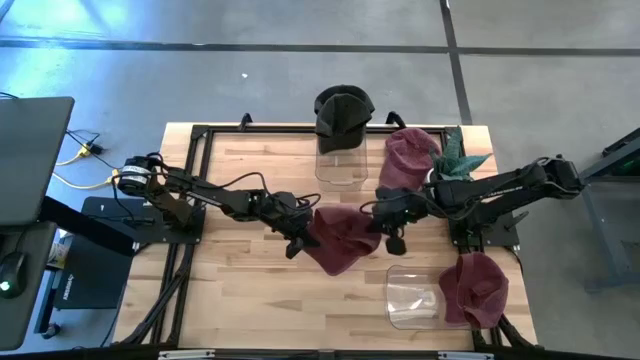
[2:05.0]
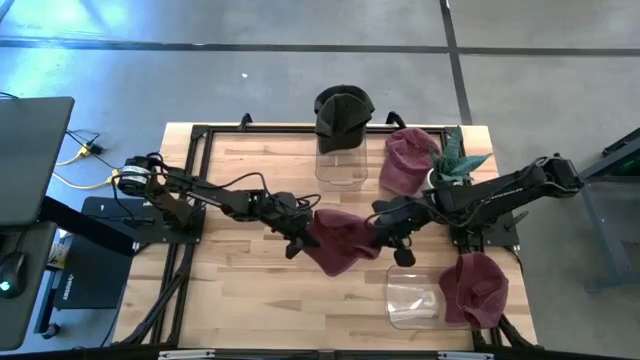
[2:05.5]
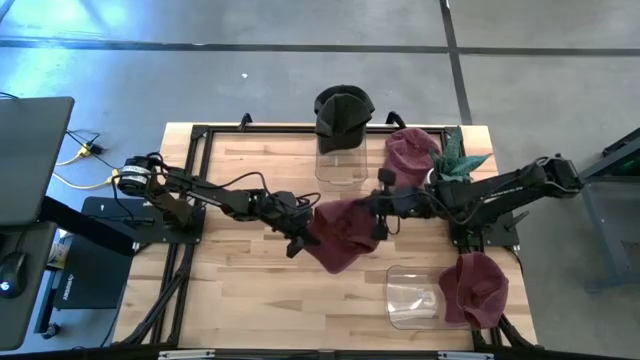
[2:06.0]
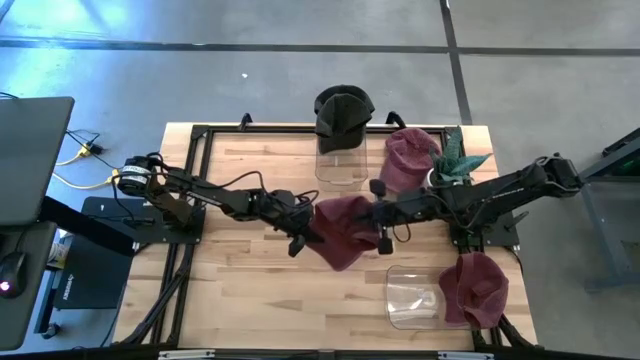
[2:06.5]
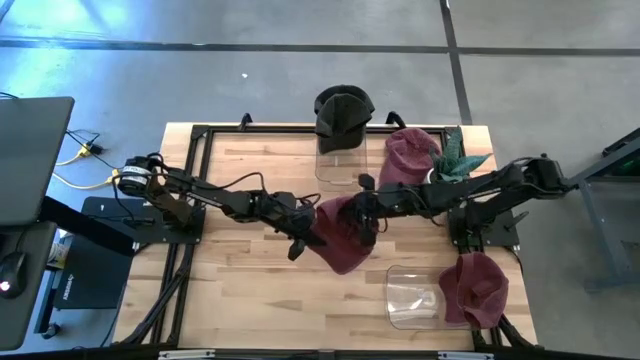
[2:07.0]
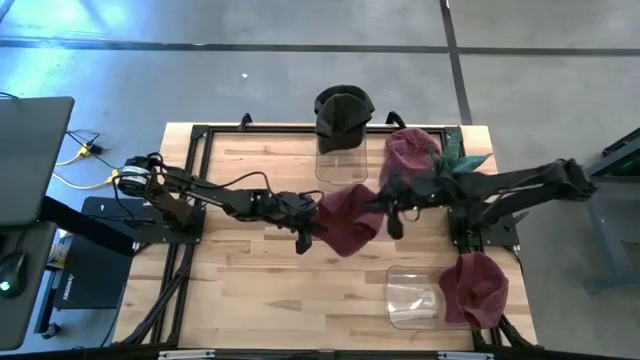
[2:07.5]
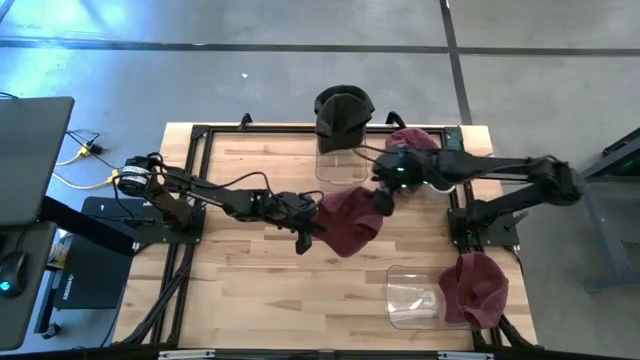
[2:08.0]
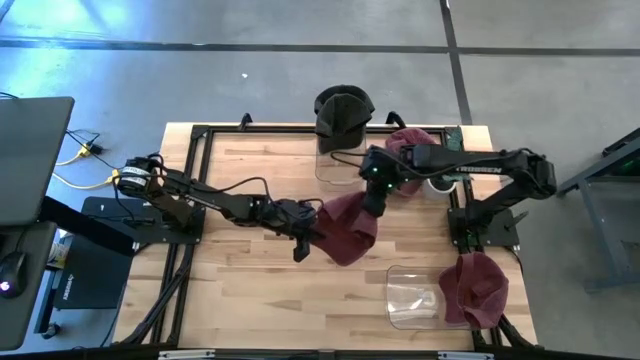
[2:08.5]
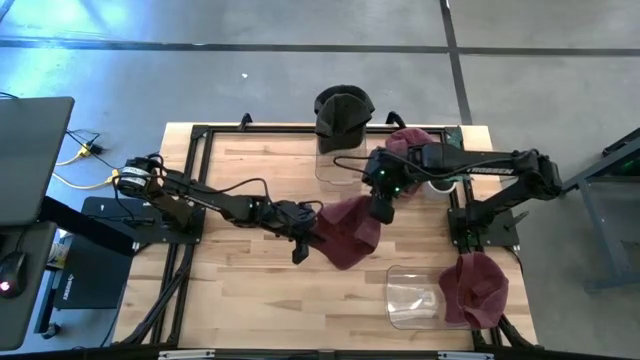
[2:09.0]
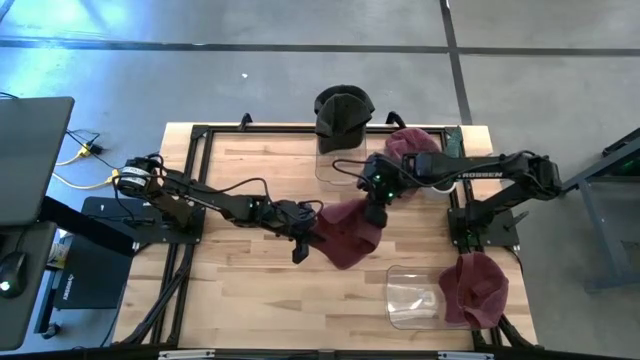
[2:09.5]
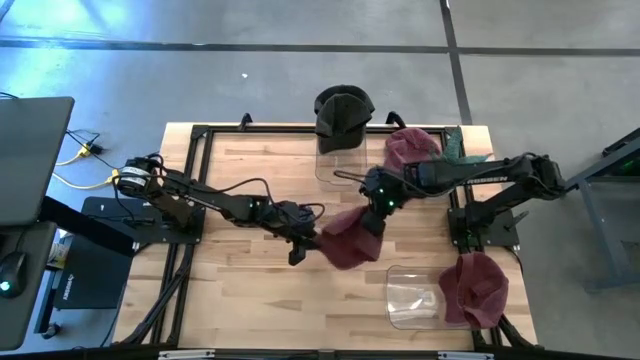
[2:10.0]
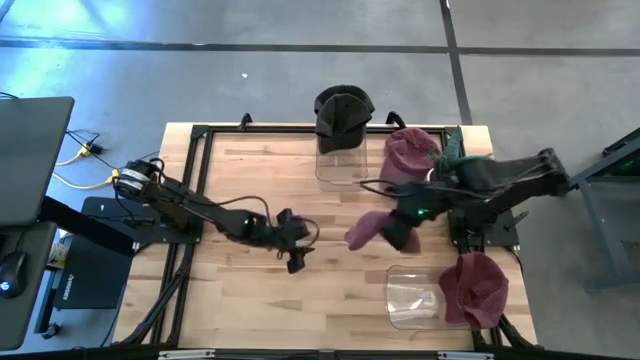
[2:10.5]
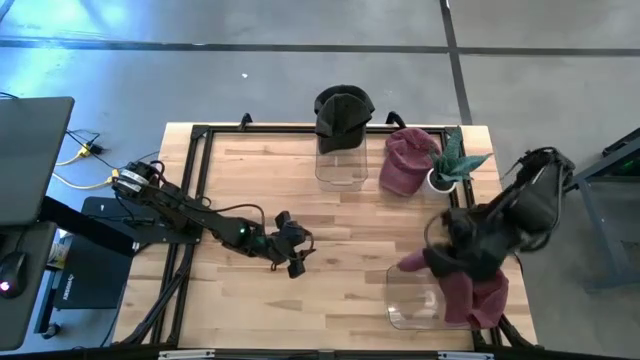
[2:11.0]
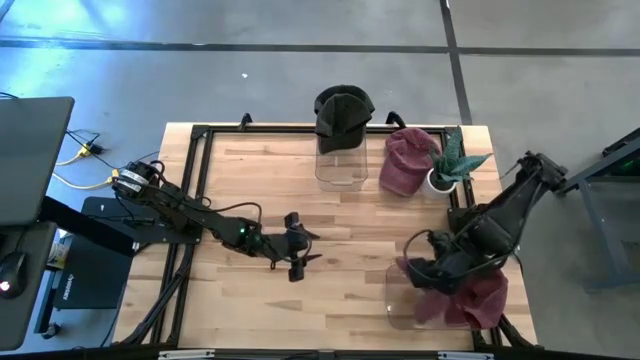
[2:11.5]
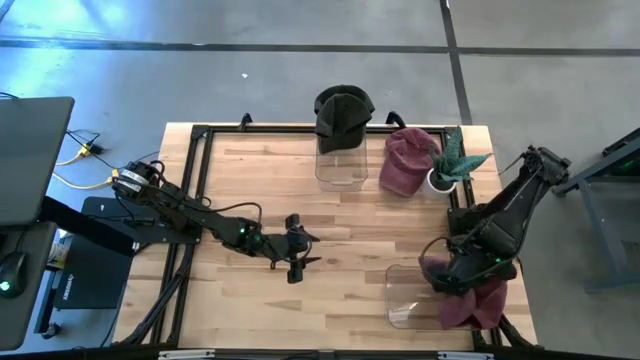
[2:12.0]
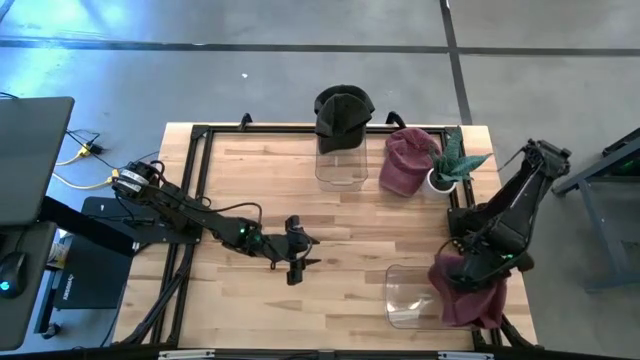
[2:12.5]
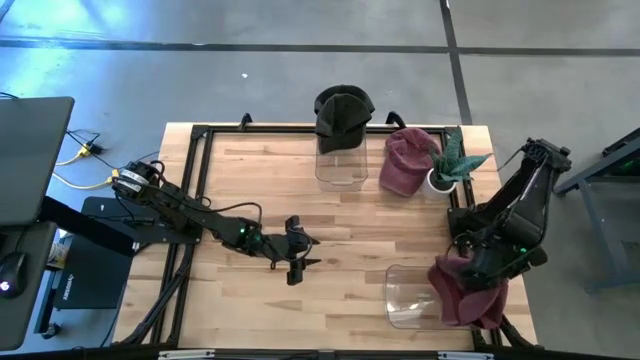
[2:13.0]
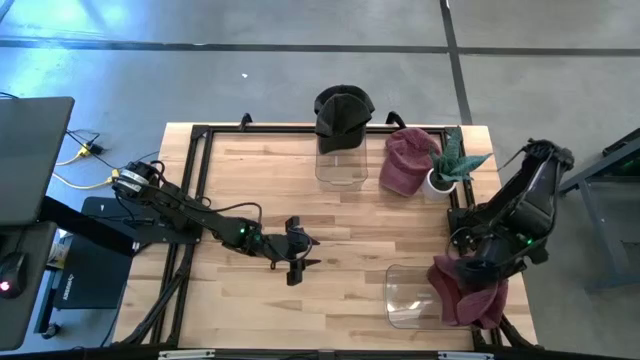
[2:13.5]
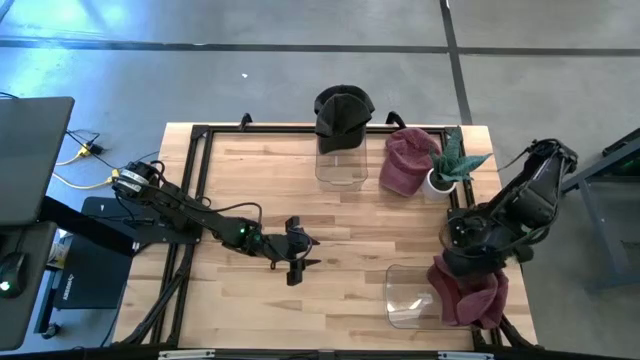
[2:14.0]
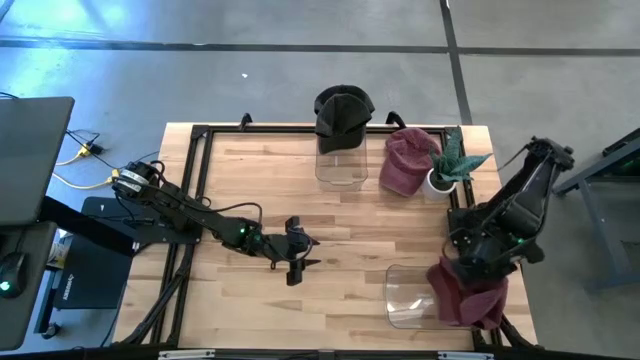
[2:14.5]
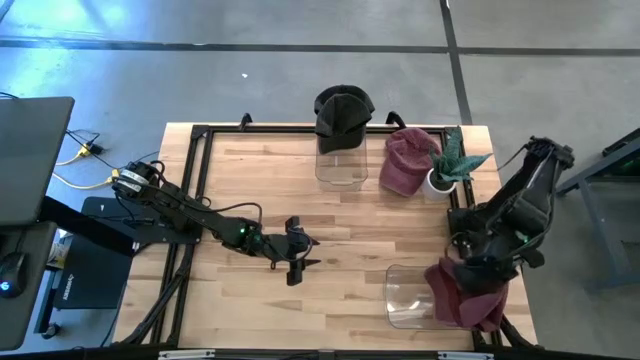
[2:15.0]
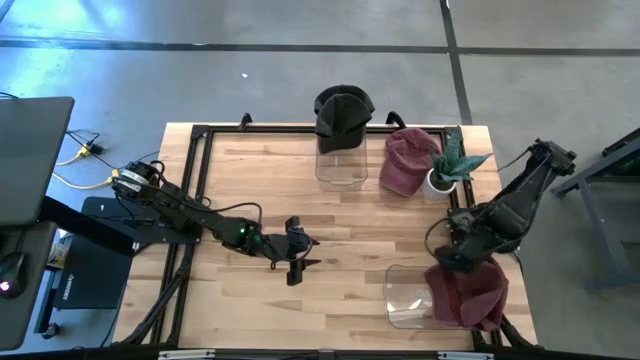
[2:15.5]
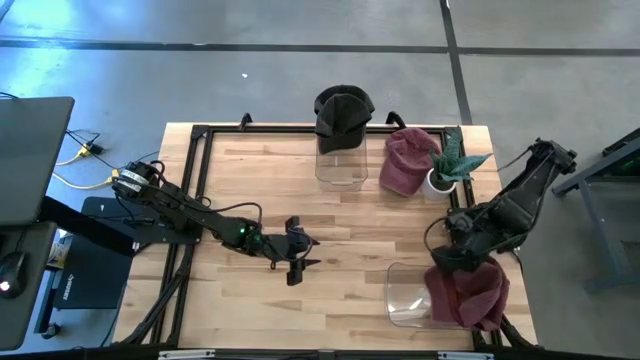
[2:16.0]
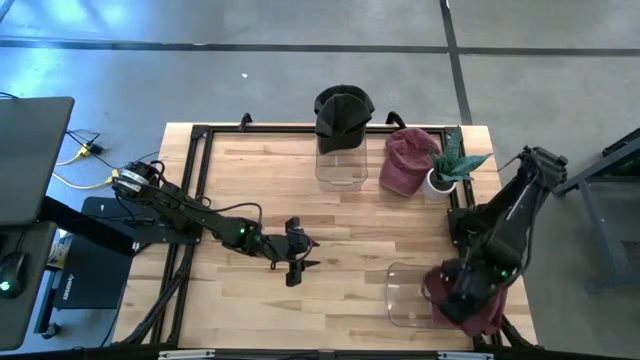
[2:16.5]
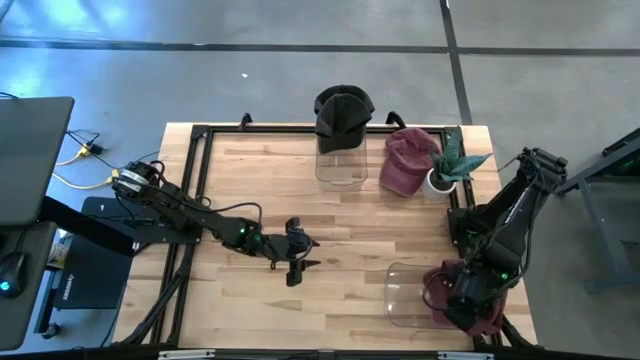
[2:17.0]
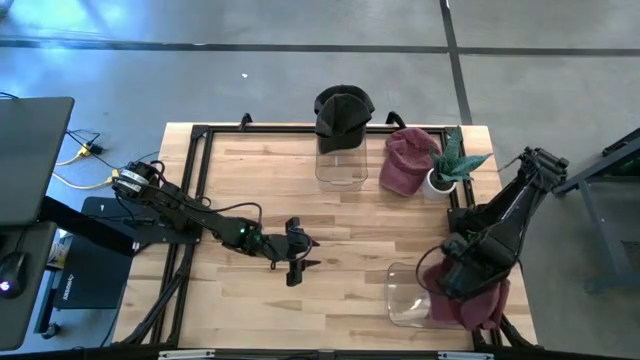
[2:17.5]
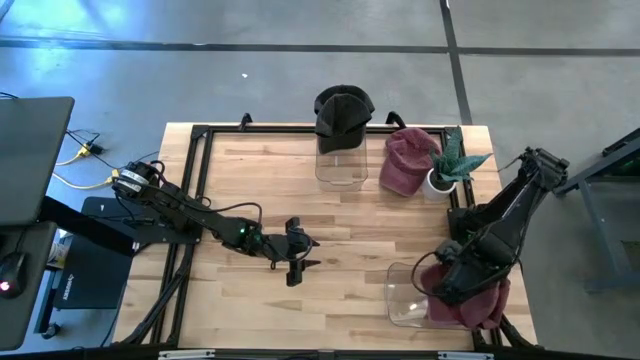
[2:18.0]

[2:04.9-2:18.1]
Task: Pick & Place hat
Put the left red cap into the bottom transparent bin

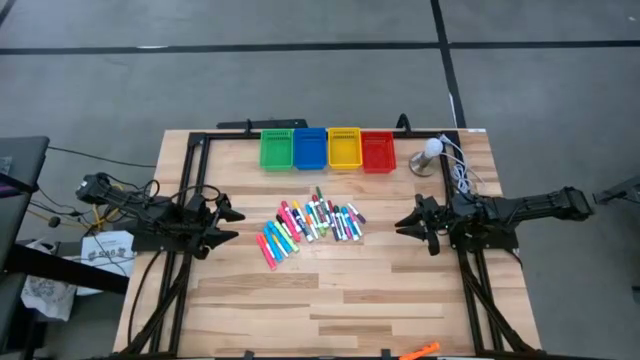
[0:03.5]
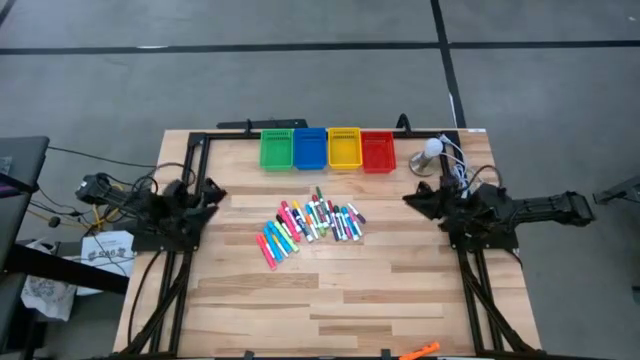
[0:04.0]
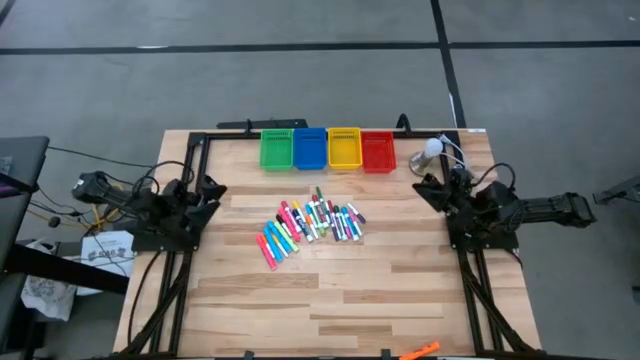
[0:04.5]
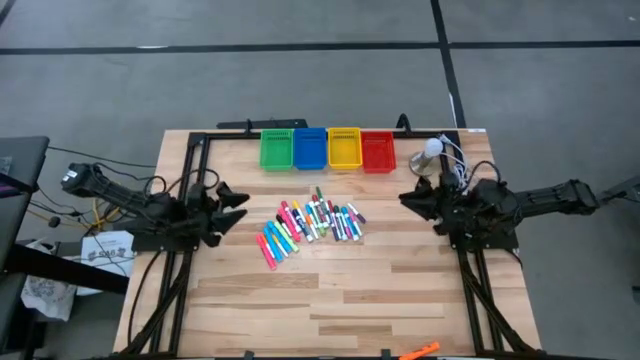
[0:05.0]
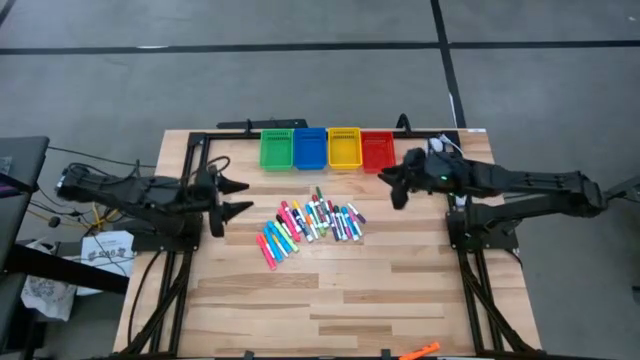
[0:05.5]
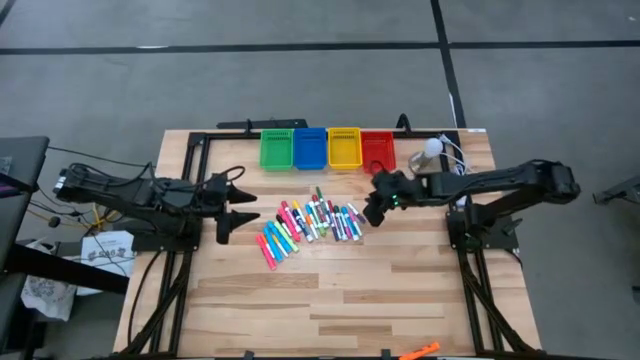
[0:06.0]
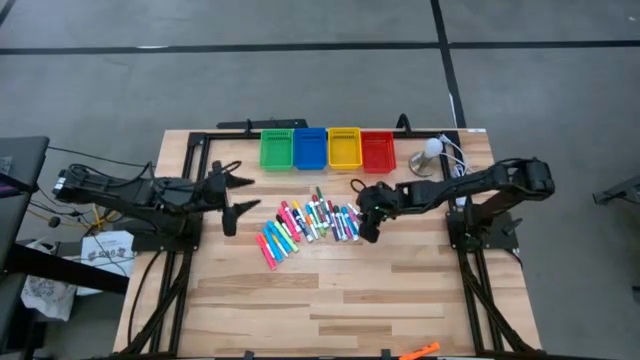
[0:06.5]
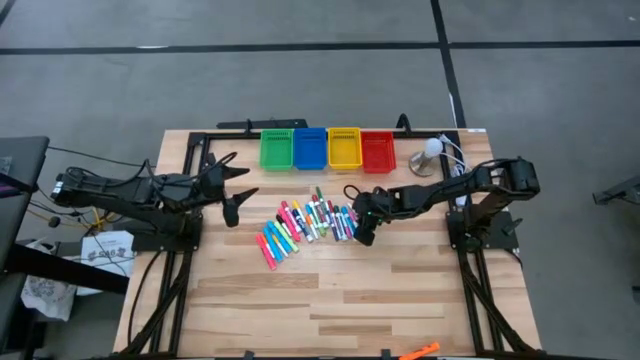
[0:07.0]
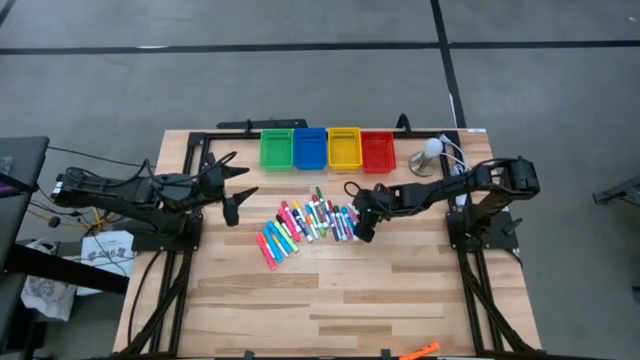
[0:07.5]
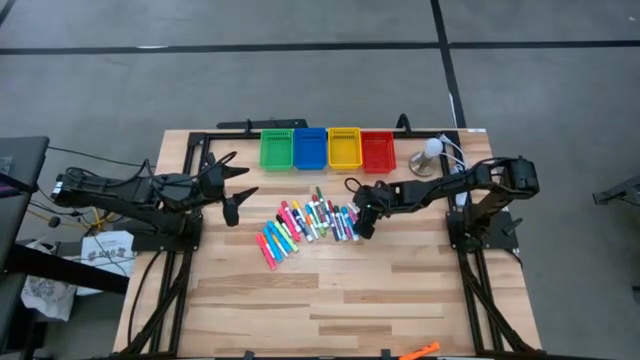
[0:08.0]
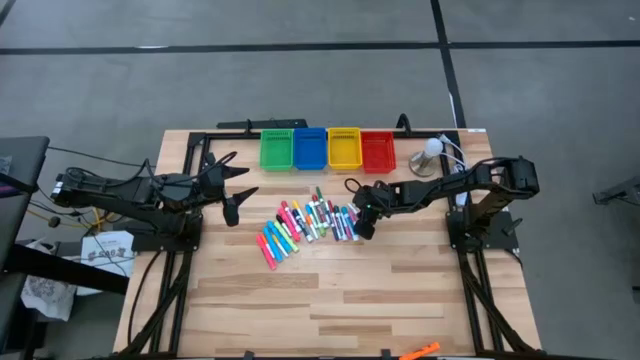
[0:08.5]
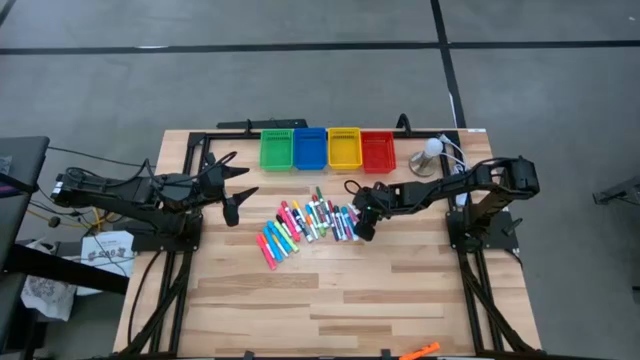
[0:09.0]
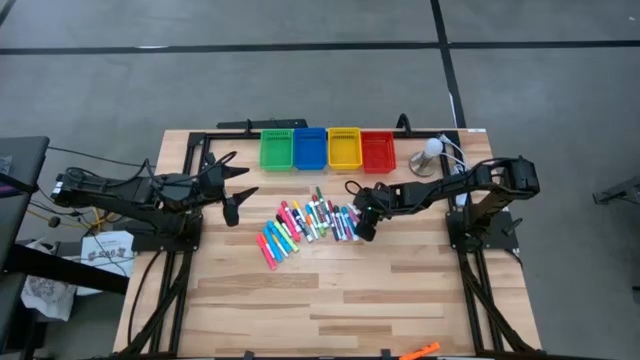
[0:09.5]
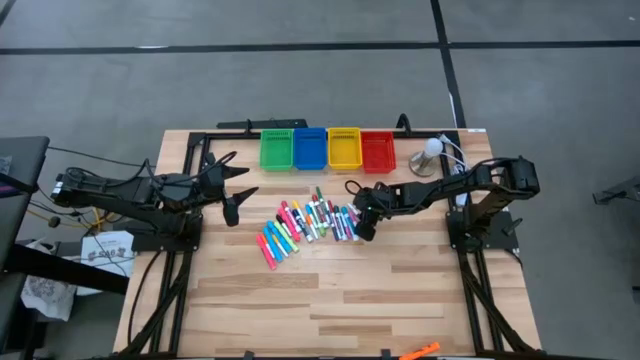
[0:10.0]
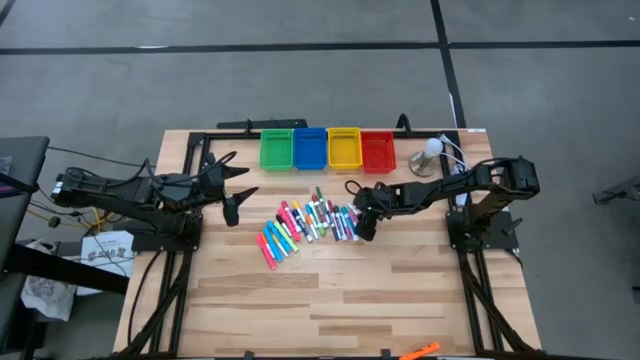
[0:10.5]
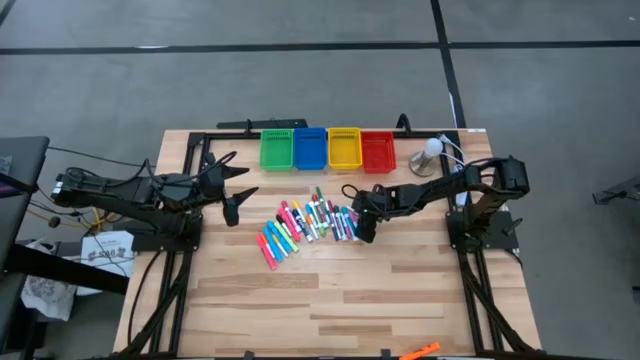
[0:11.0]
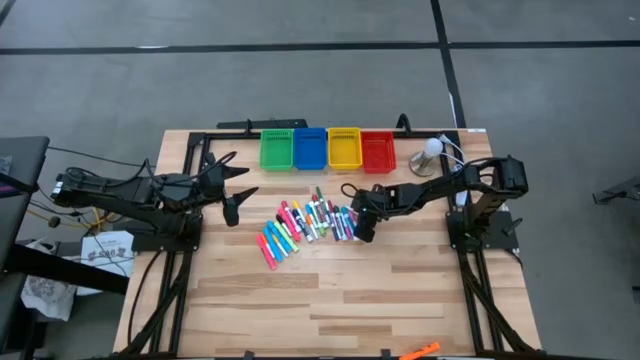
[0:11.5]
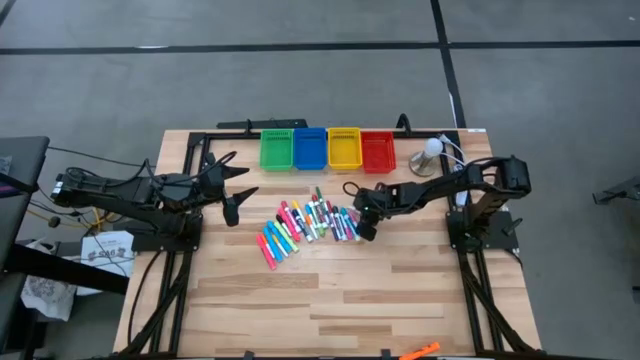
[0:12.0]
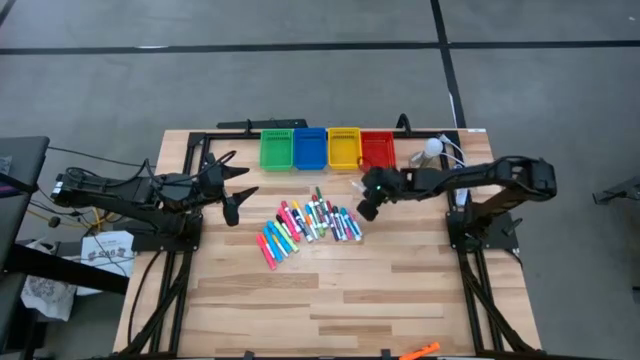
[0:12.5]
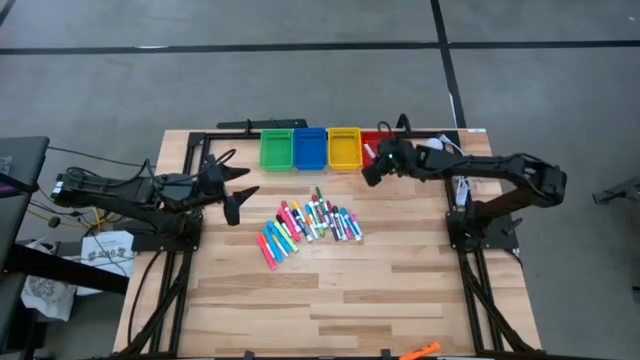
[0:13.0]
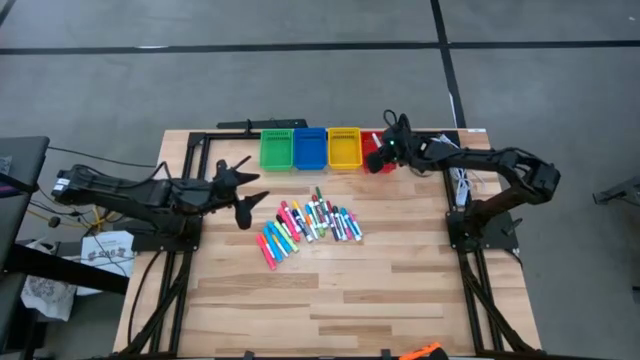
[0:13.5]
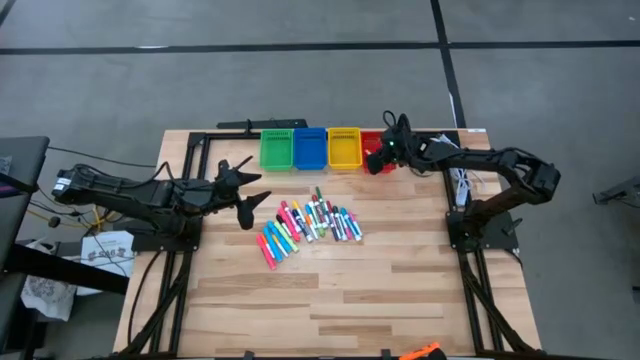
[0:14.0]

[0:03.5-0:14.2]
Task: Pick & Place Markers
Put the purple mini marker into the red basket
